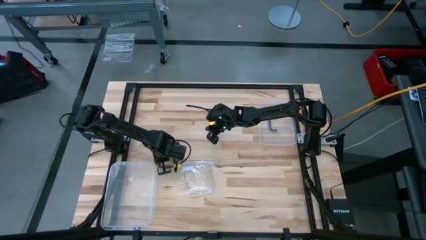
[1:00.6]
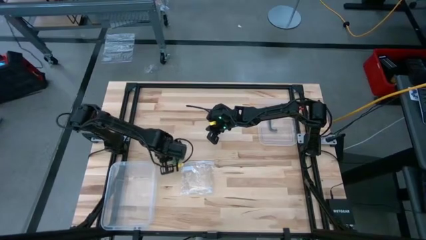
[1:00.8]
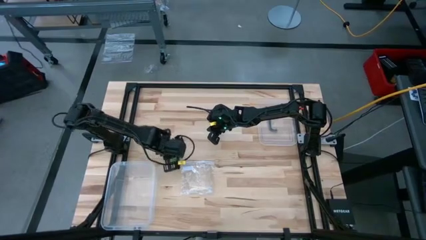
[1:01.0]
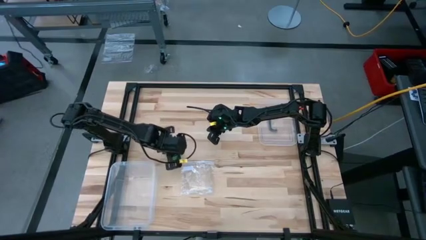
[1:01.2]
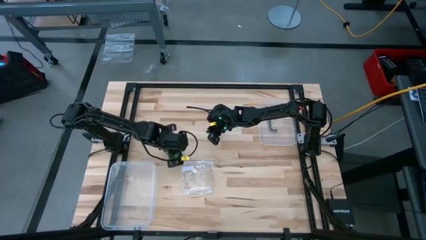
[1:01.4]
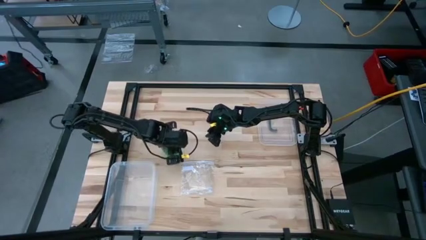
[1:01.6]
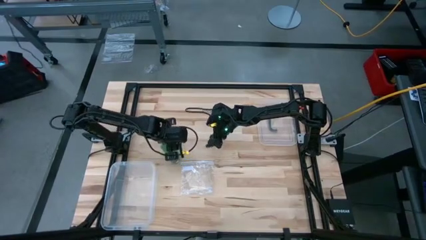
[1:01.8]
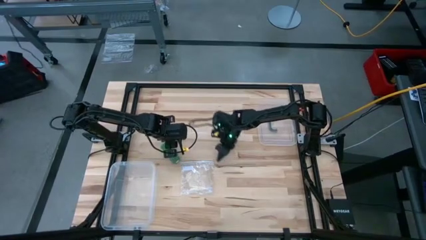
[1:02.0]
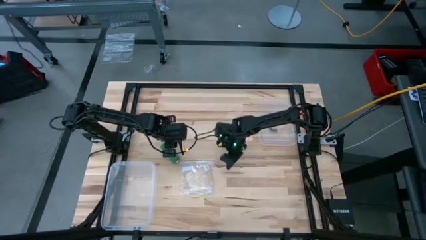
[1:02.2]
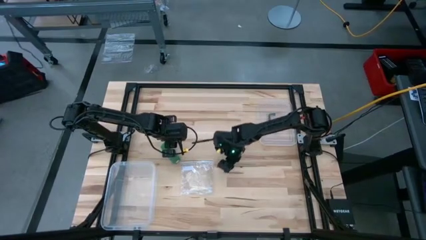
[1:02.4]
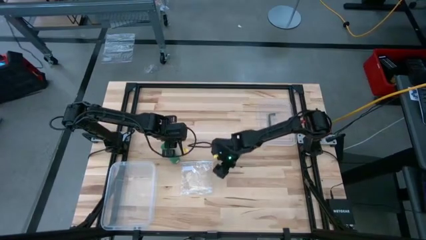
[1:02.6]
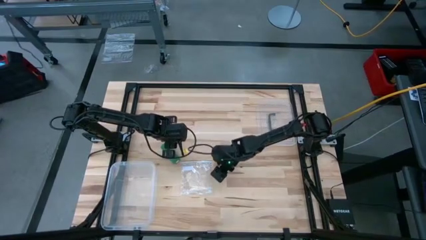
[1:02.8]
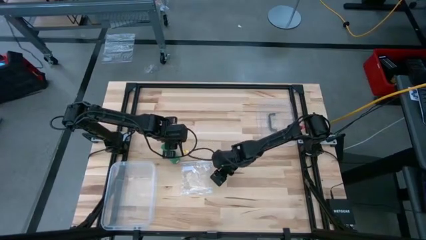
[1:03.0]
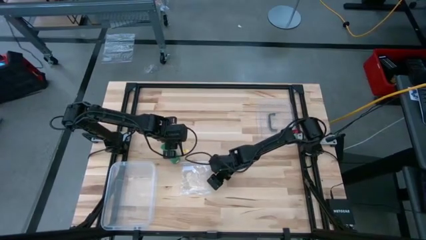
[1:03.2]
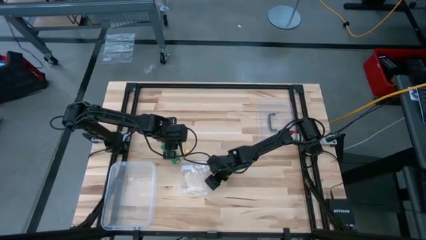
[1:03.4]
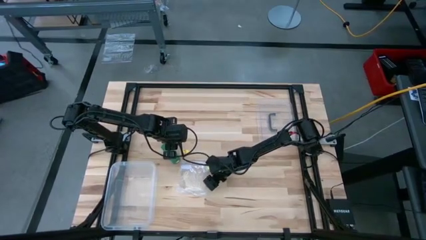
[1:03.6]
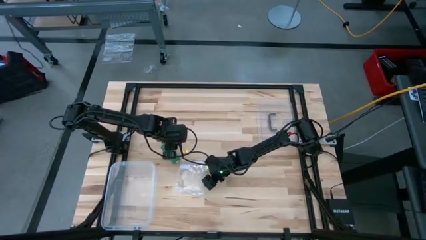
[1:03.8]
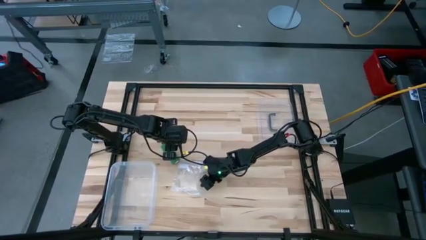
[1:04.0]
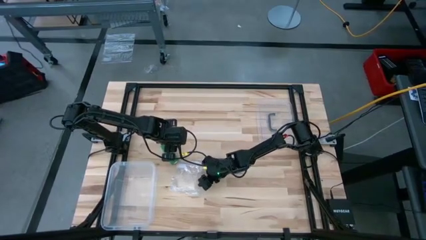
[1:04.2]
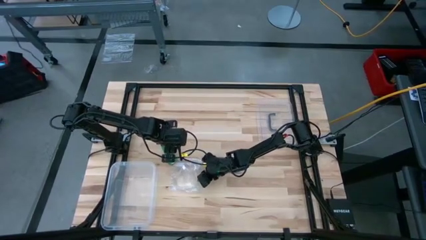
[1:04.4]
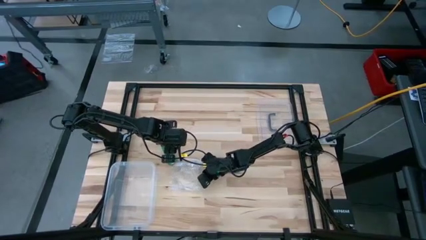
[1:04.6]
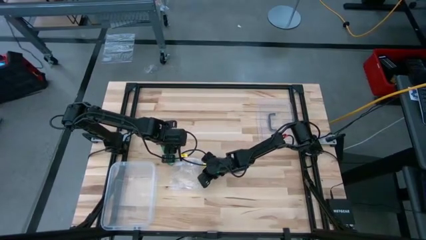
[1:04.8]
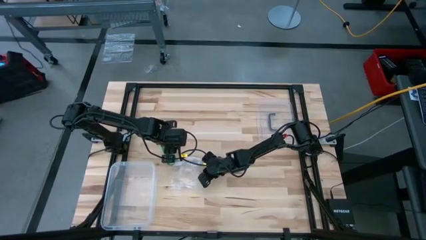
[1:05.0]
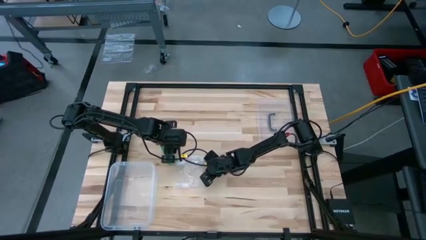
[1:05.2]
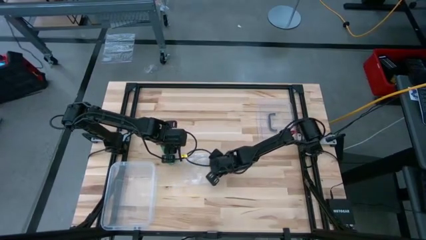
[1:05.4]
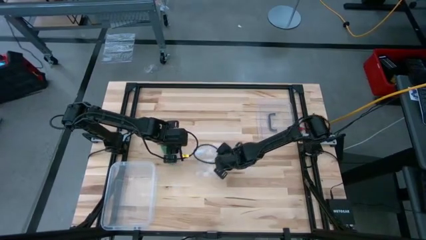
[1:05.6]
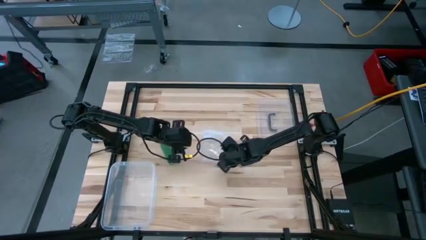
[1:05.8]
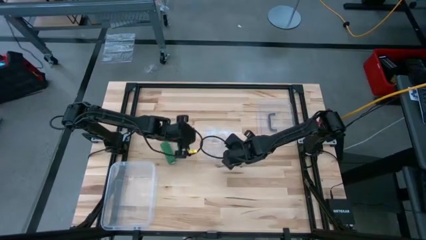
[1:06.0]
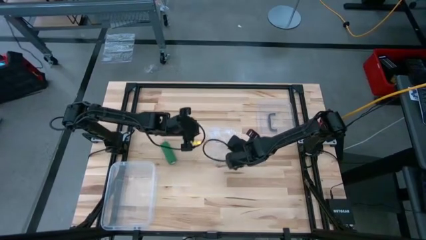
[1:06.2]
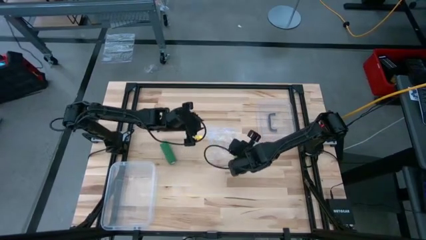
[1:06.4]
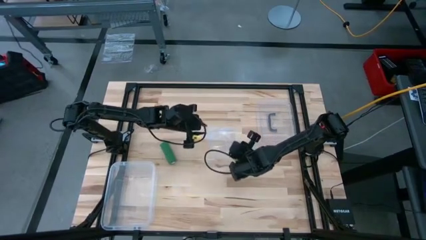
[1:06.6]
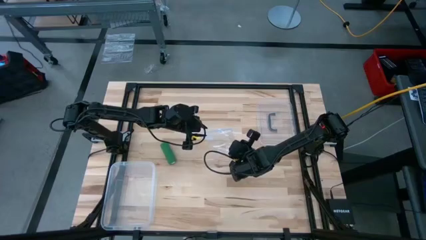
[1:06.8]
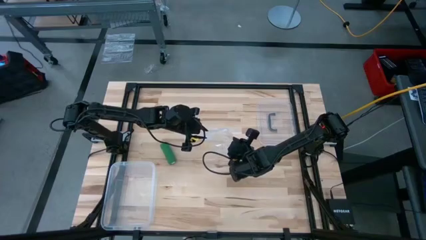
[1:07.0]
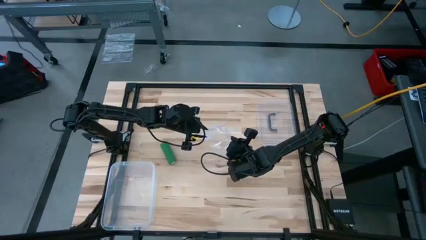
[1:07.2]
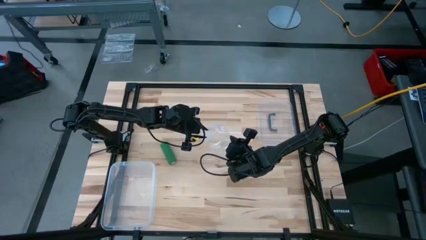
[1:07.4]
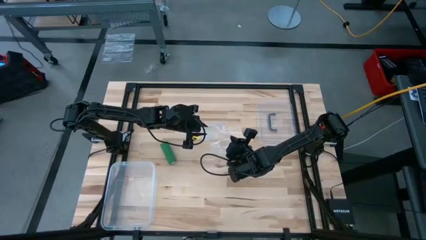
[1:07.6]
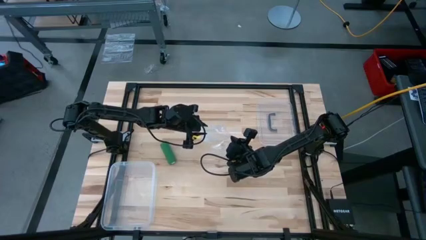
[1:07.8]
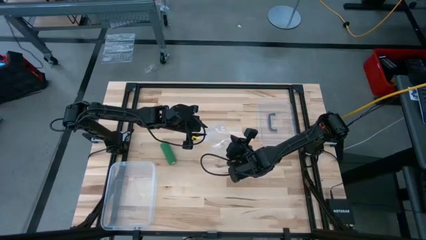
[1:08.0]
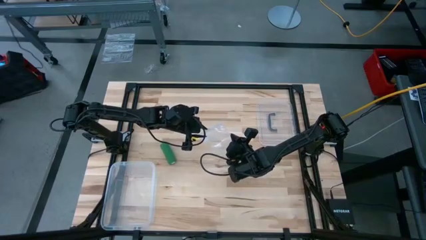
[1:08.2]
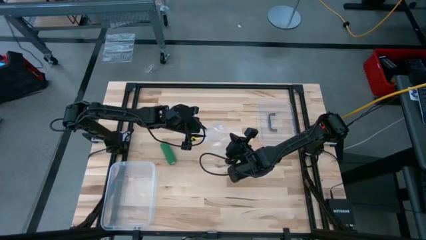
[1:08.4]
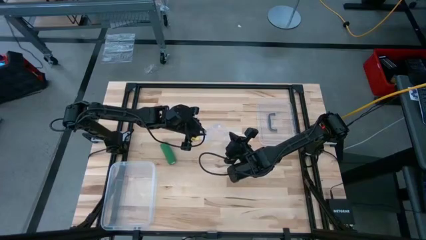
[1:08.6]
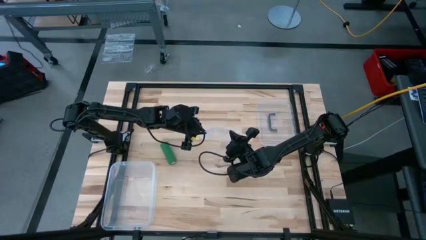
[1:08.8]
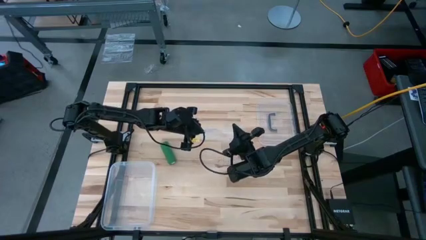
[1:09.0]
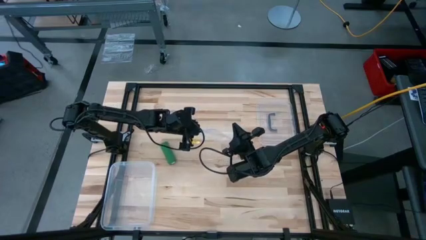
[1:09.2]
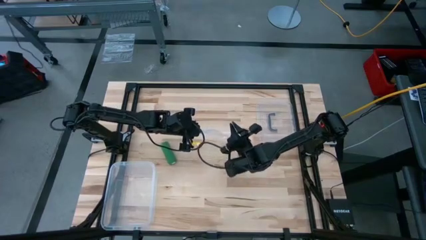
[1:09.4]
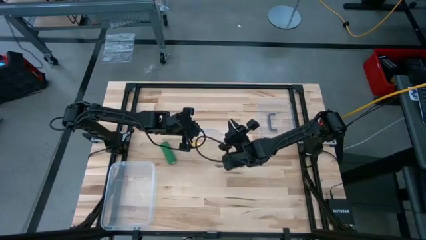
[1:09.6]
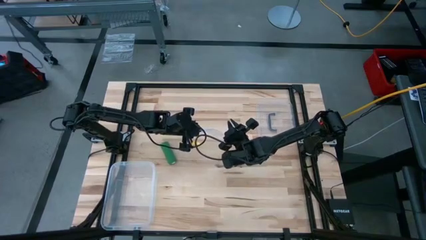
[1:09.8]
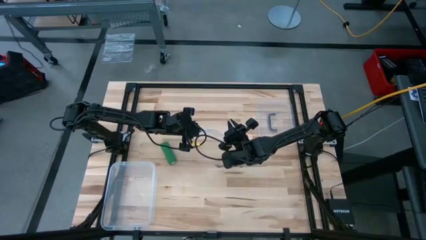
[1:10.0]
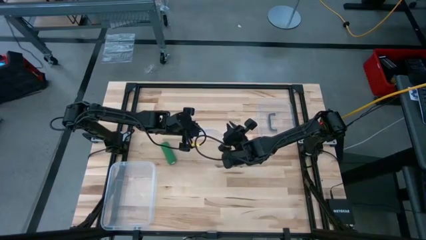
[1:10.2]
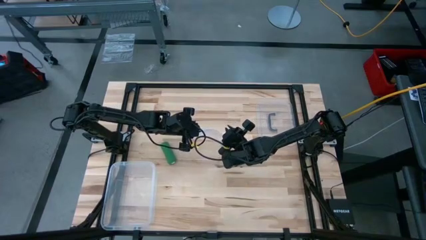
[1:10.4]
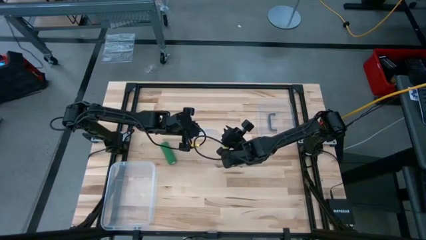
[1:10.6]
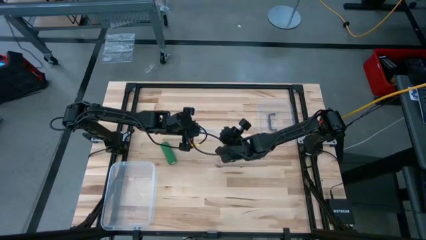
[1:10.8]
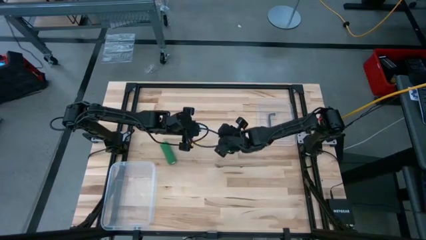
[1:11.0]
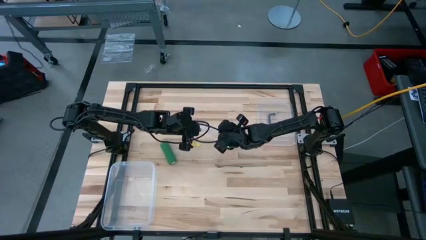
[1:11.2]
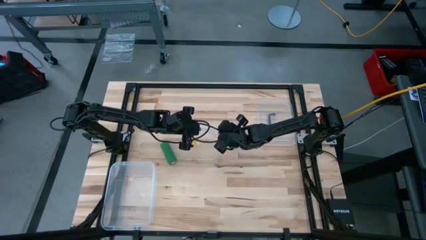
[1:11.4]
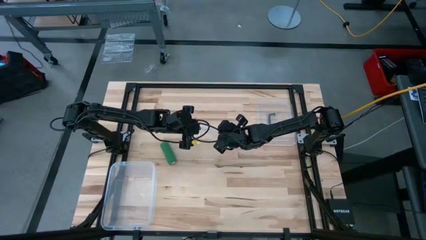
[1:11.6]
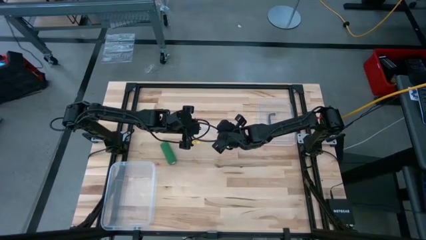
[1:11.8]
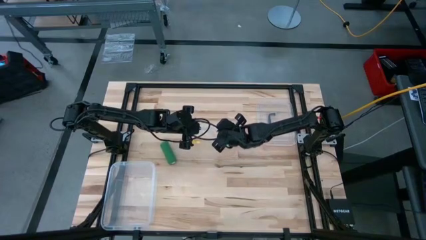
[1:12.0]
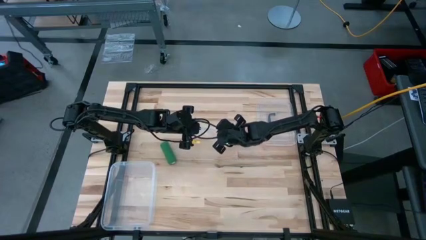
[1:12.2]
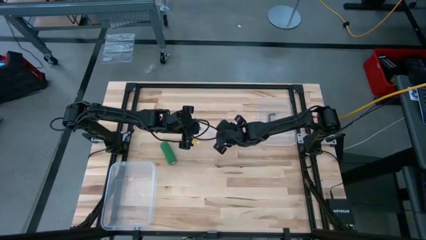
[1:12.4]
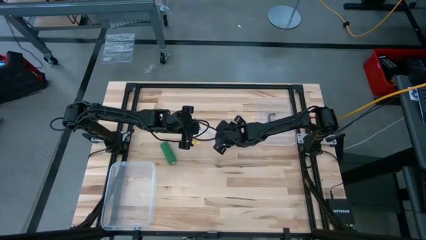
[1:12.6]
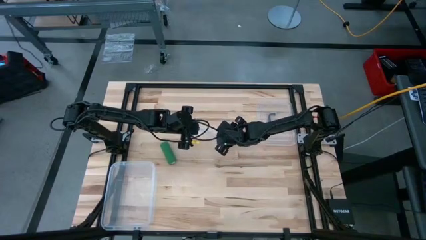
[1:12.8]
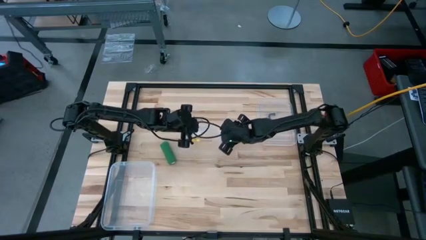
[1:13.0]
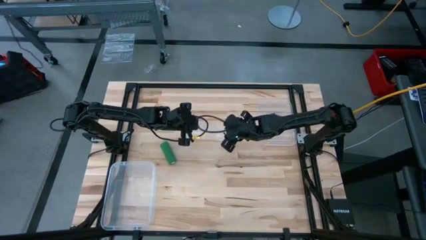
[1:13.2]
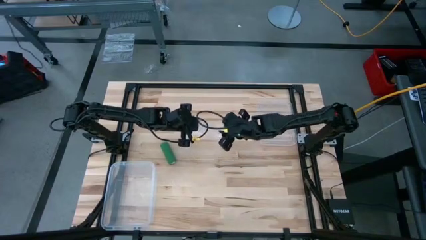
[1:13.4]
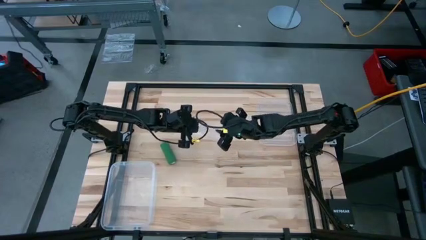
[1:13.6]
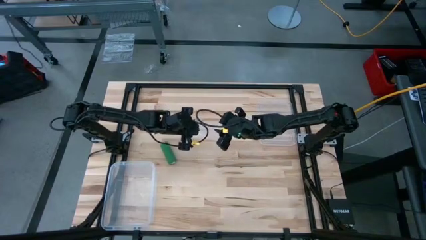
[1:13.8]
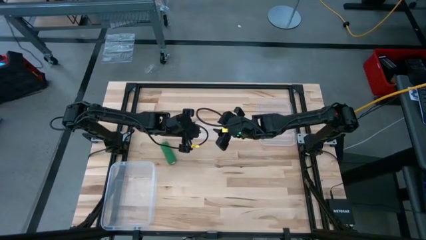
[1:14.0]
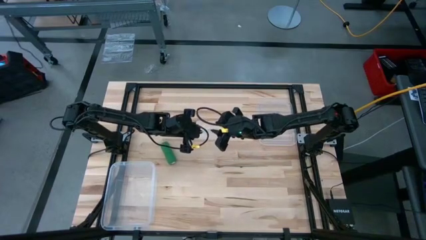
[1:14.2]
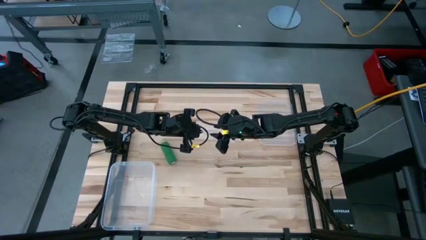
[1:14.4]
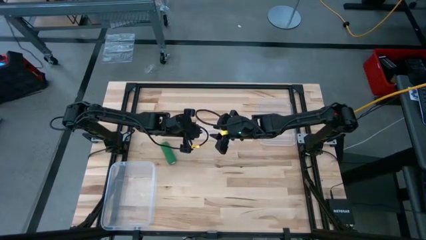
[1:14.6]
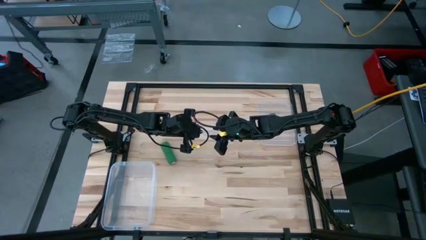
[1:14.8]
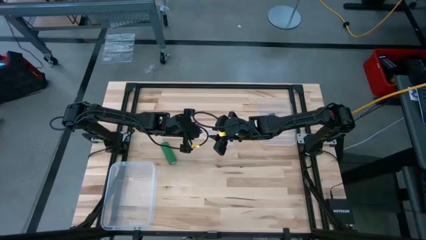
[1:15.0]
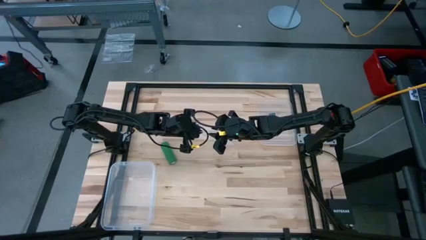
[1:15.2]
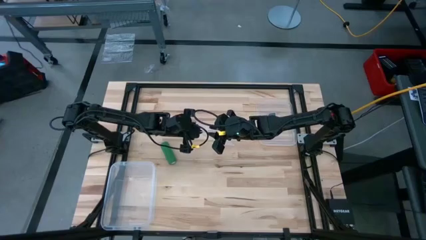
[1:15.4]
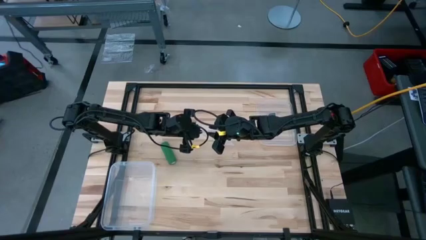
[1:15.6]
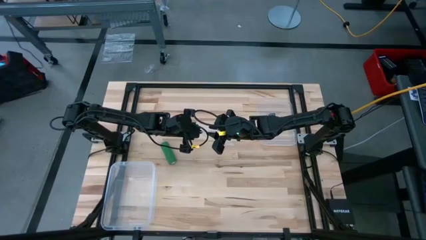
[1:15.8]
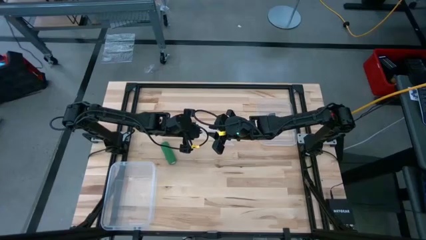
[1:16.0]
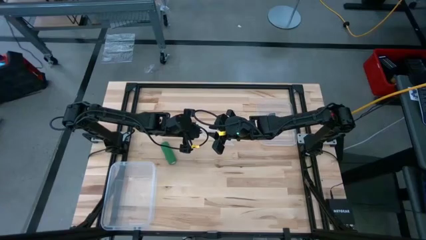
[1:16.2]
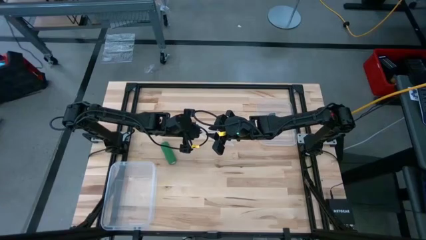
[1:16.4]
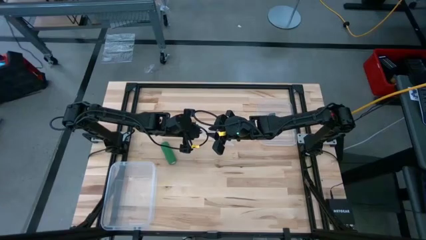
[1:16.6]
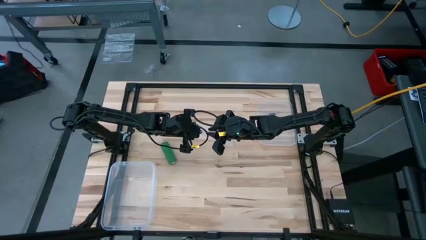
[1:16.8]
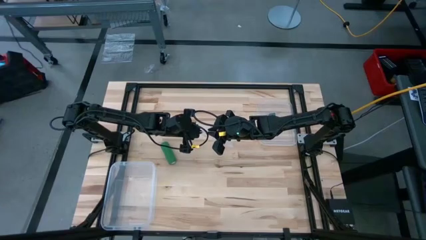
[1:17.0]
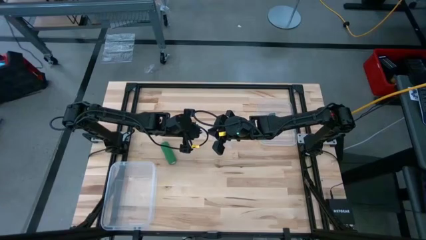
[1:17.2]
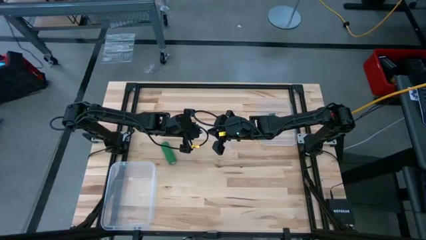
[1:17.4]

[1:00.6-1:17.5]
Task: Roll bandage
Open the zip bag
